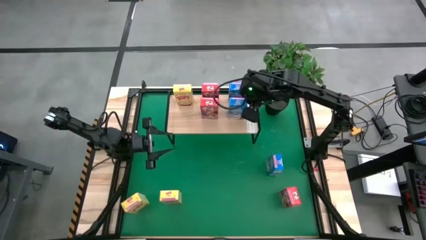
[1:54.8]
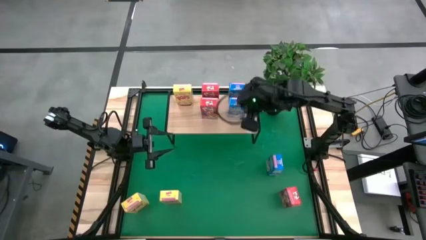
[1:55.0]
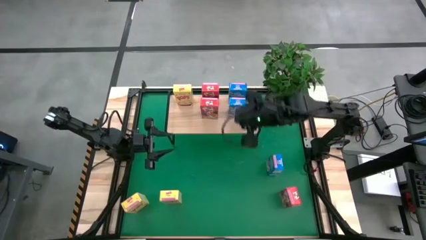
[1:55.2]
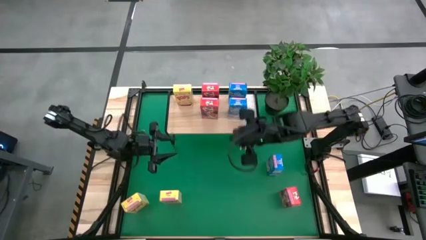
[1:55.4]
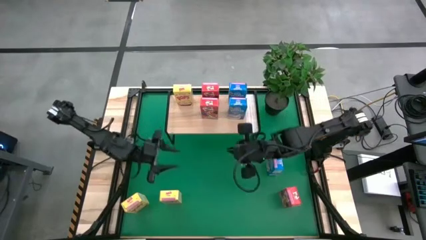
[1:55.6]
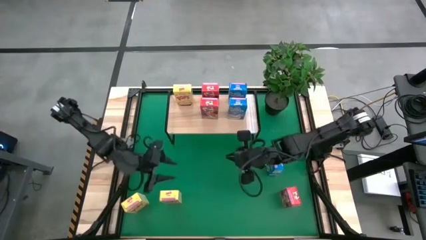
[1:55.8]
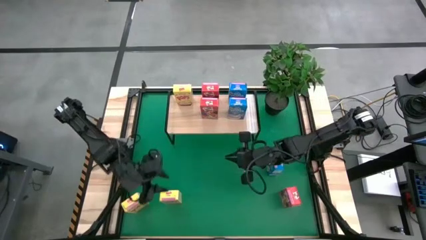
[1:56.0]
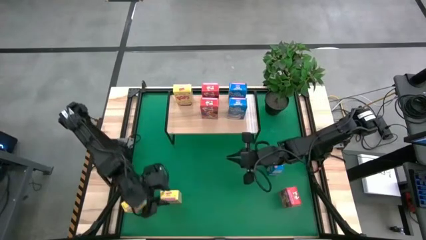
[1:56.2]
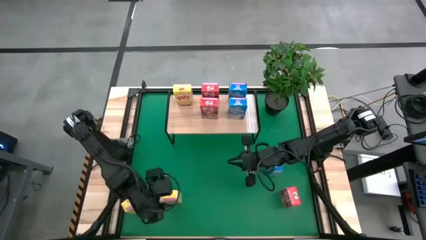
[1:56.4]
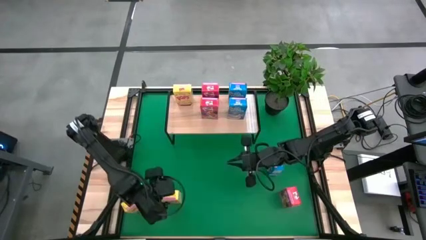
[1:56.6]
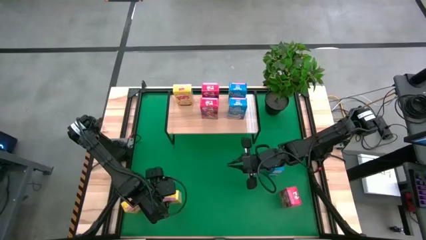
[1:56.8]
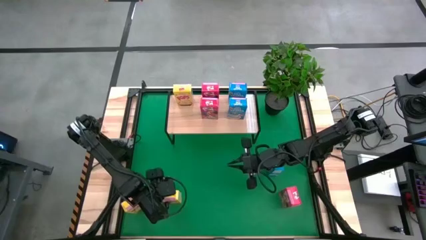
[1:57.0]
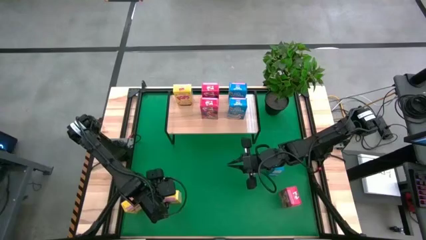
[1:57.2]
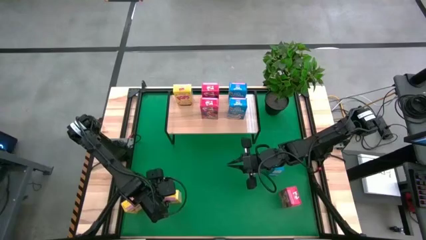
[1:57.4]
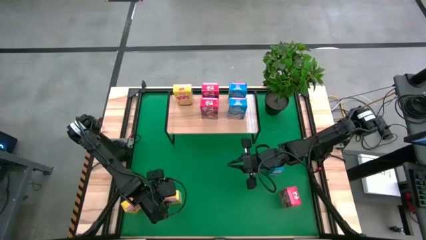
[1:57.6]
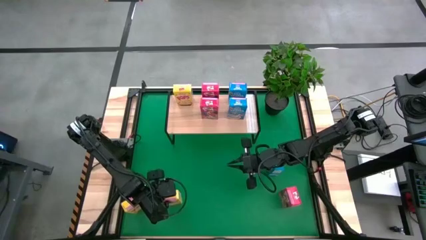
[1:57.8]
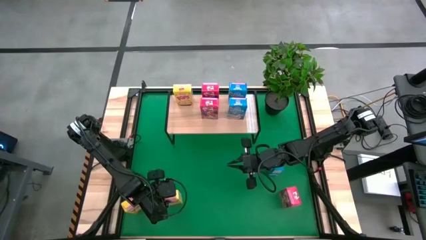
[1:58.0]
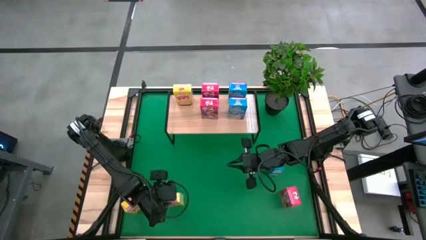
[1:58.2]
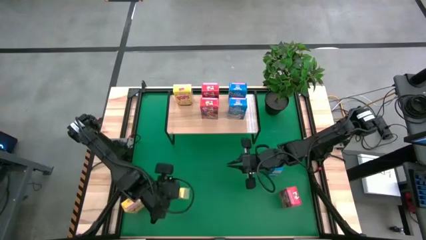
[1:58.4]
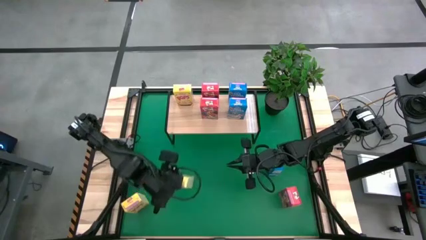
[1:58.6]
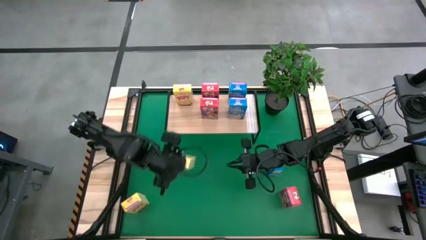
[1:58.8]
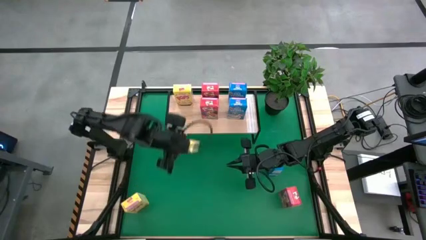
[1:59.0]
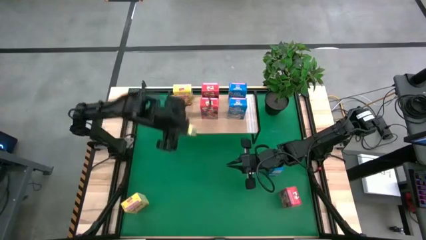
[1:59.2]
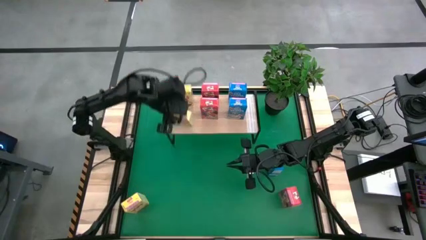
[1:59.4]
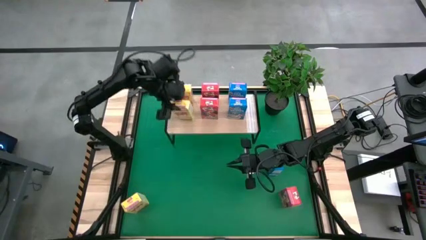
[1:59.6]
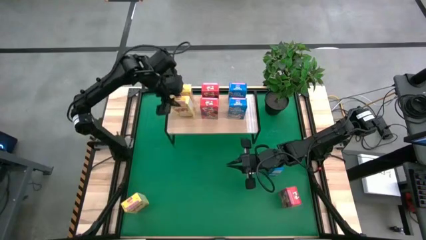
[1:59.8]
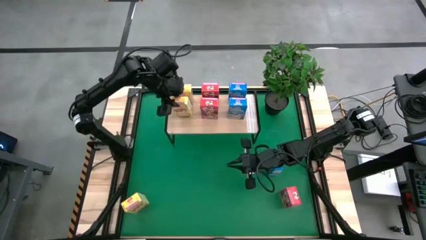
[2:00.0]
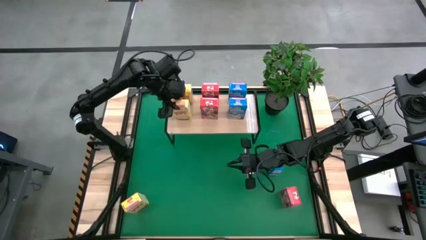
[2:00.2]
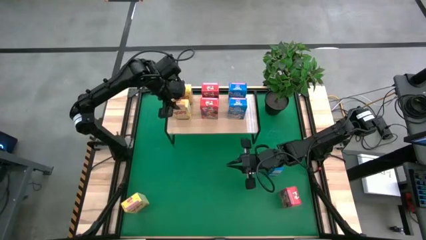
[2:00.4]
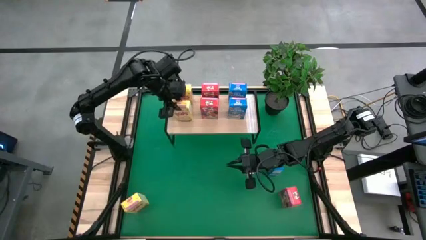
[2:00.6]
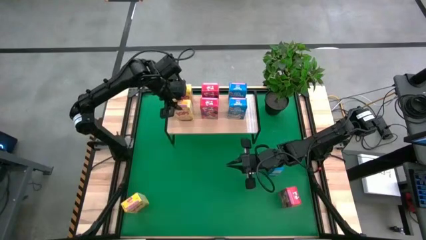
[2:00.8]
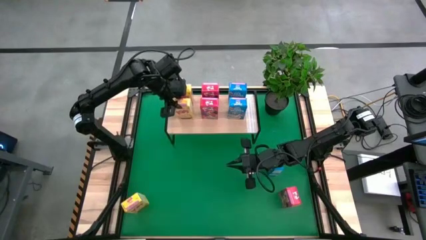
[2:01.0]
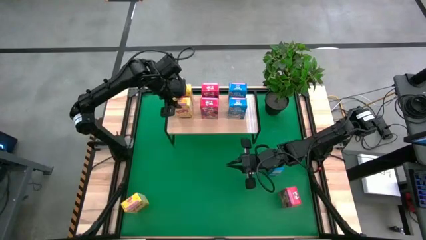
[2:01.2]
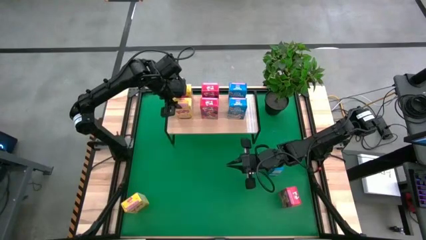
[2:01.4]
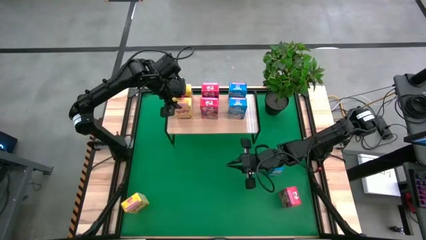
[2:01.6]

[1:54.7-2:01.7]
Task: Stack cereal on shelf
Put the right yellow cereal box on the shelf aligned with the other yellow cereal box

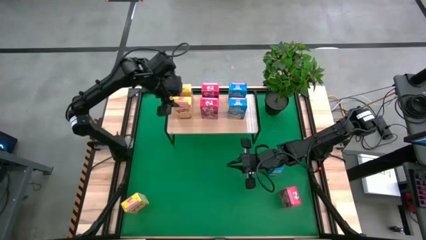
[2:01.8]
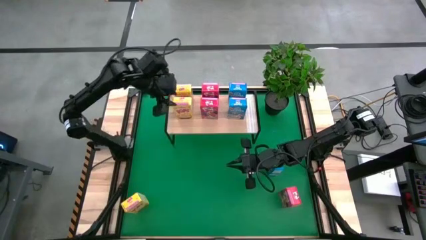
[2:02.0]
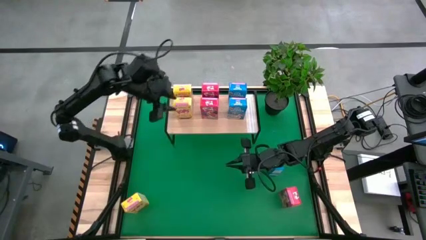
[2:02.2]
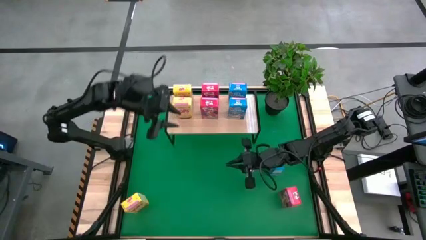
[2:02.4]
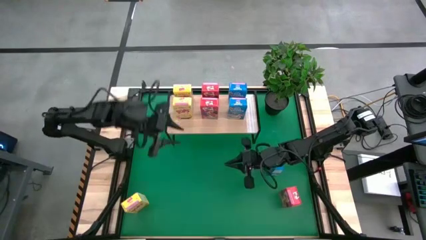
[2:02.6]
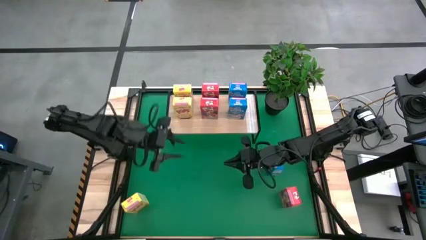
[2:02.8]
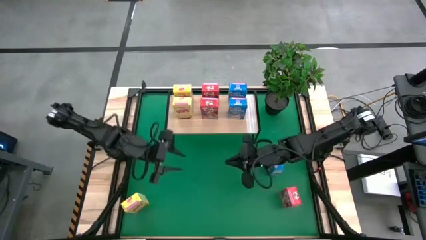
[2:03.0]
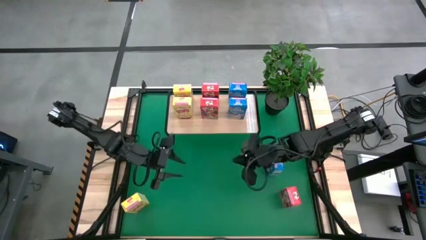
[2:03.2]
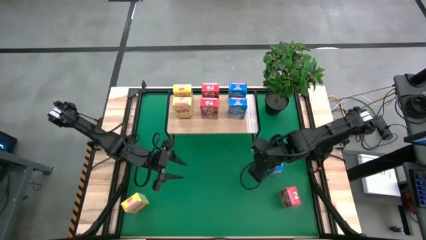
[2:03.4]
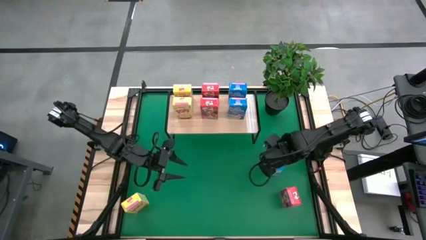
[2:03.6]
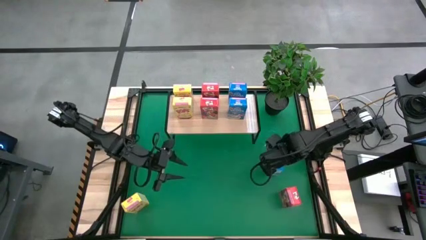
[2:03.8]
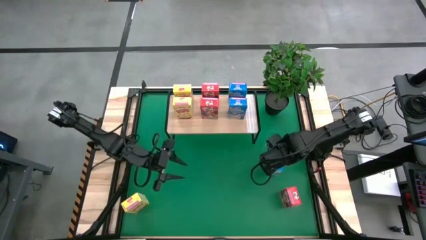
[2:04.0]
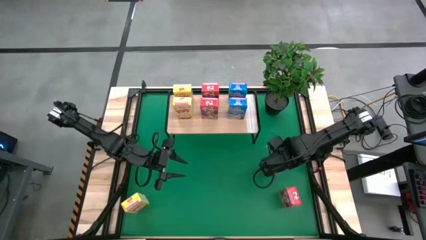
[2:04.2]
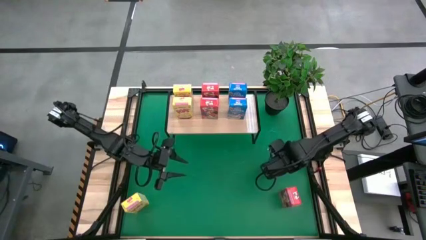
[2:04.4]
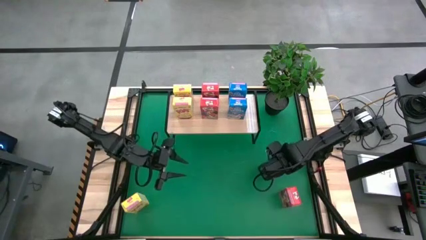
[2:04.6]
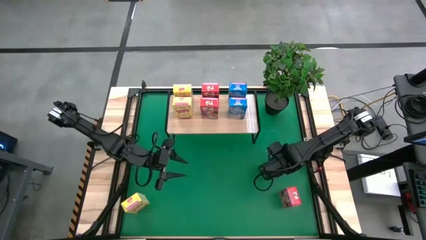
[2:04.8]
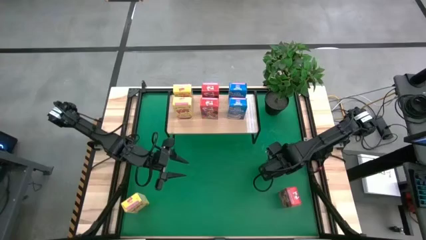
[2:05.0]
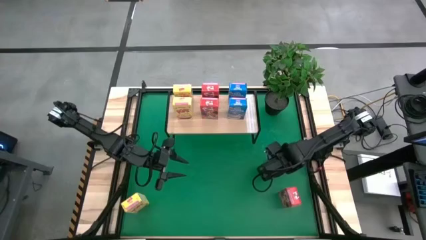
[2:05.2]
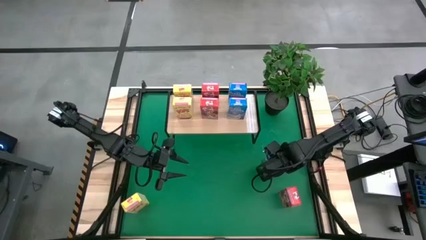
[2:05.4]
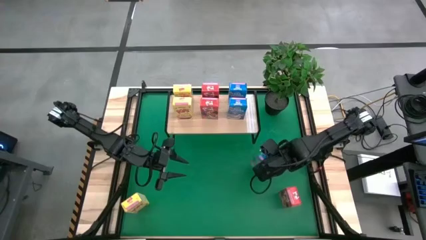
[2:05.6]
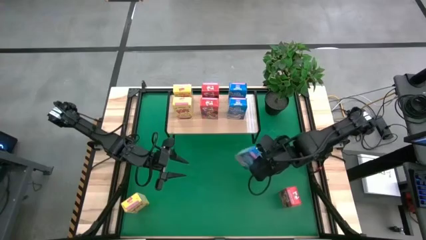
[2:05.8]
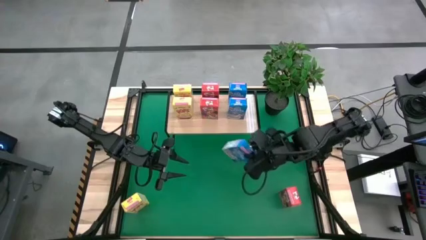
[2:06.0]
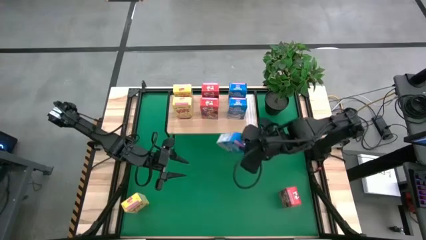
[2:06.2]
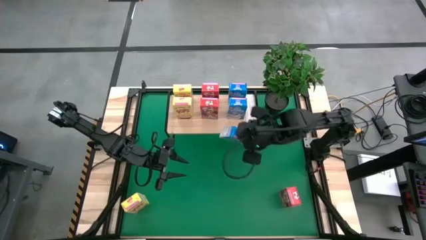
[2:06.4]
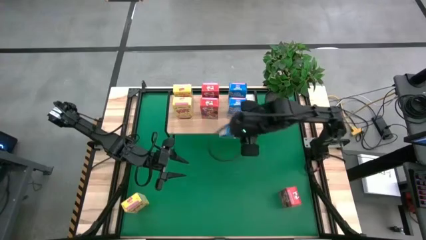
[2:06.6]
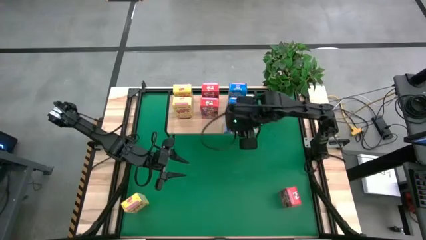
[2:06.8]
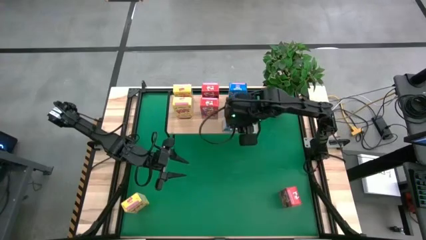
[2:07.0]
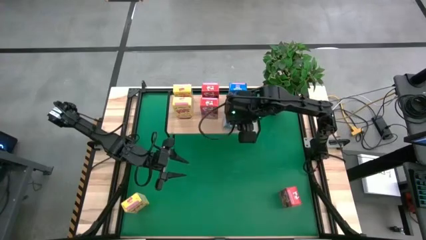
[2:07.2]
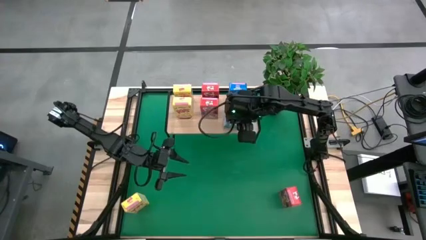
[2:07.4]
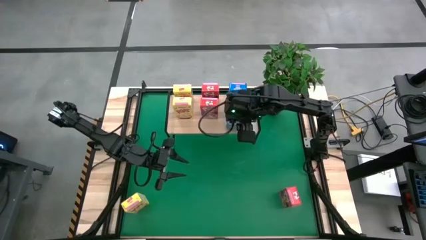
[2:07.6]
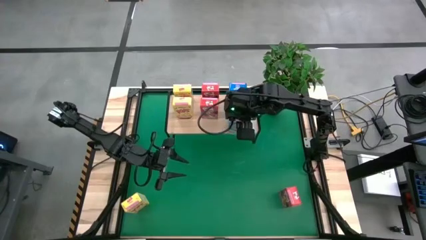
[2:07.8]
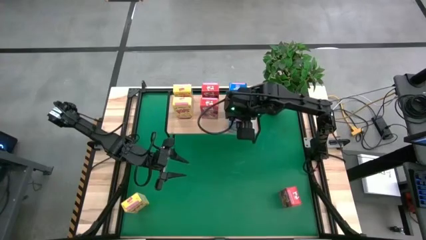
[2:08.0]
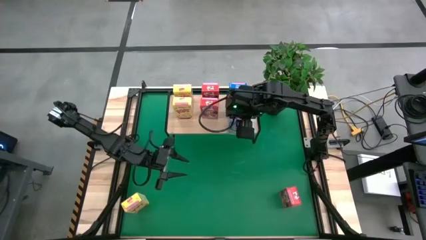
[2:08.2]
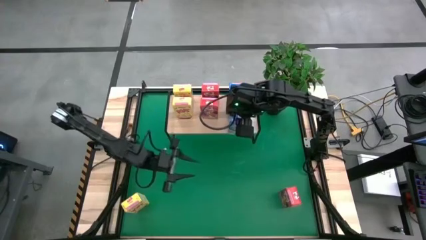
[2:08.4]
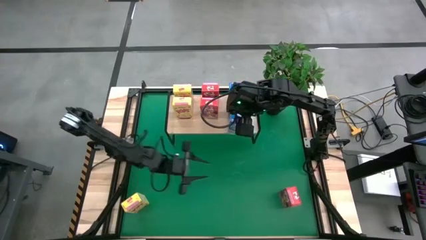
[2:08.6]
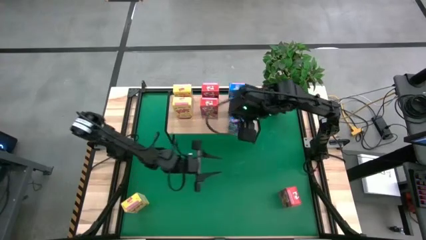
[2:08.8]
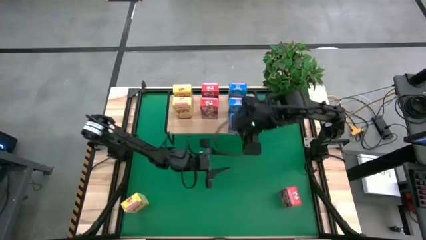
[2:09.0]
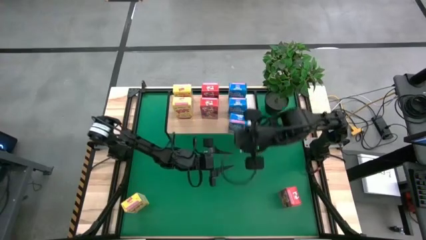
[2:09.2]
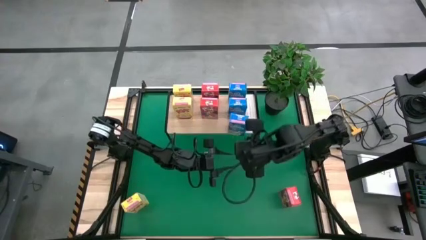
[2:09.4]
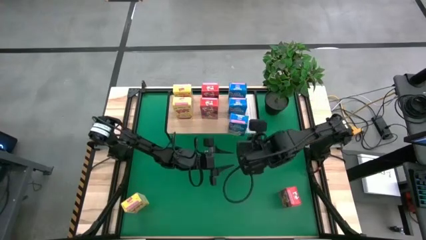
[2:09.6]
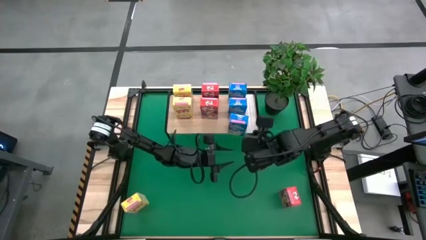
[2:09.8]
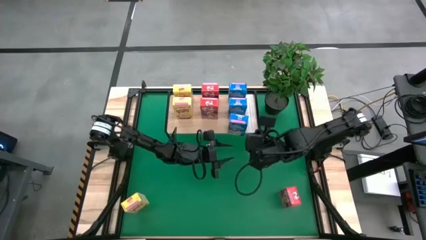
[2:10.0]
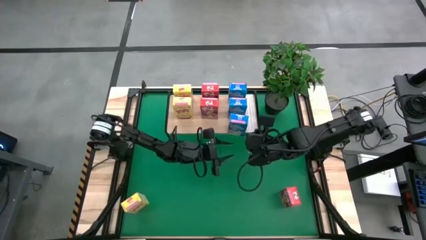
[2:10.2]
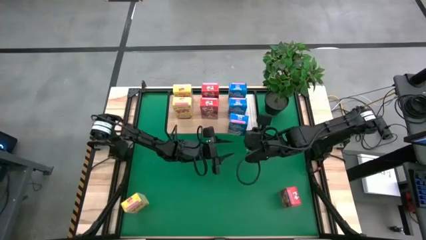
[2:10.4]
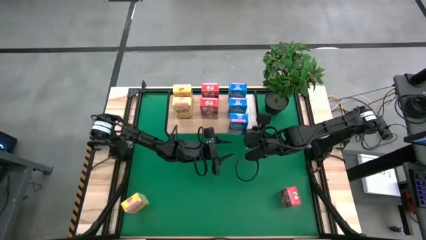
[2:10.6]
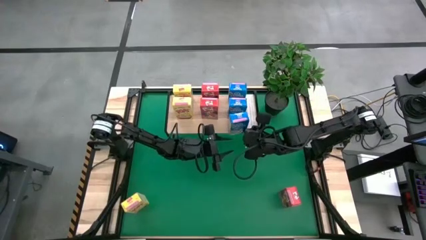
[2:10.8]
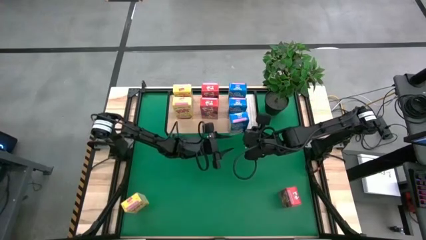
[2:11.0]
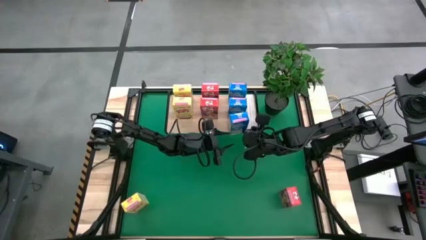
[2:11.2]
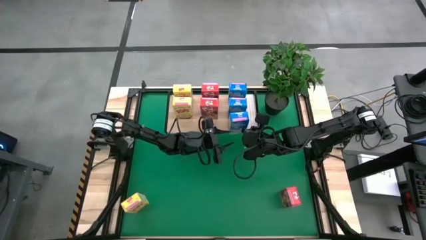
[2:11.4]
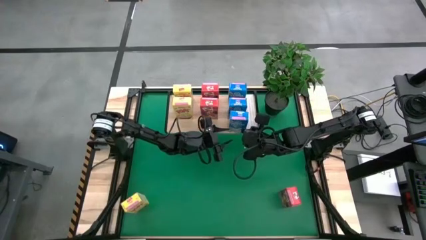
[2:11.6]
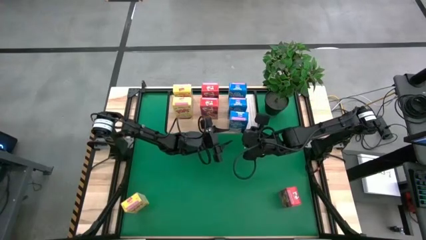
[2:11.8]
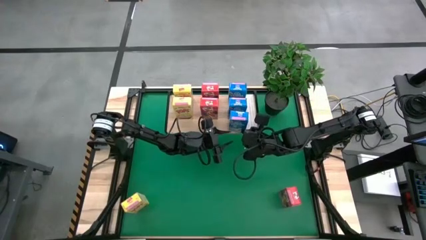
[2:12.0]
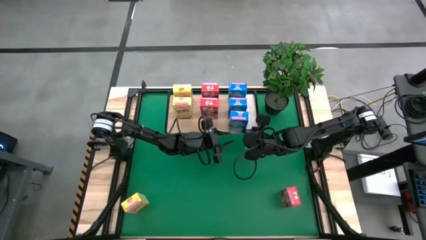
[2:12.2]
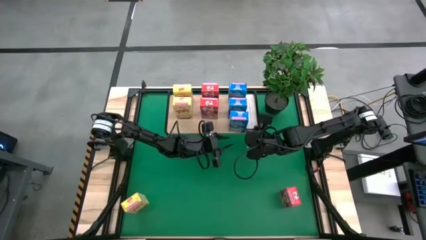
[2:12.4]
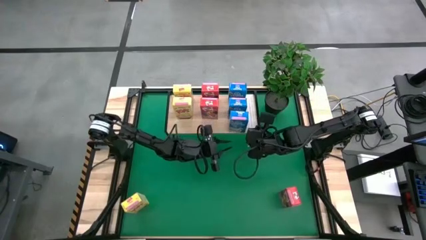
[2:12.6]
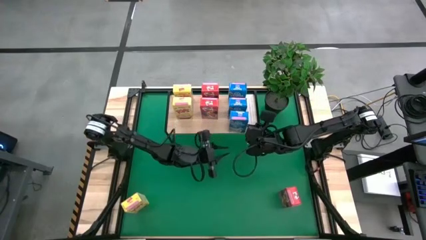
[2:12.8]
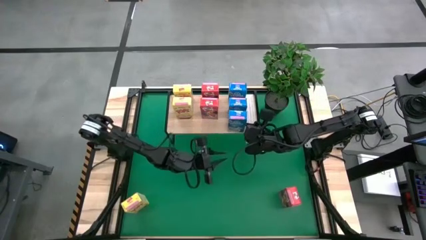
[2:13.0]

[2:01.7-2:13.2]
Put the blue cereal box on the shelf aligned with the other blue cereal boxes
